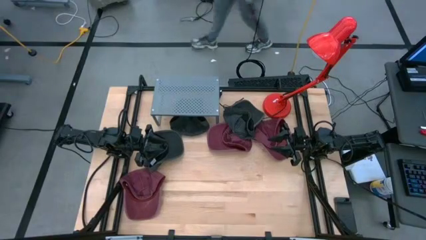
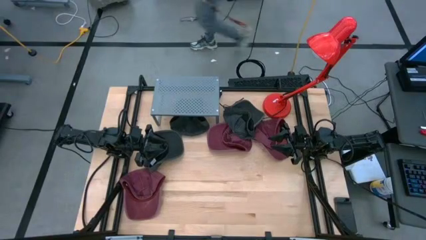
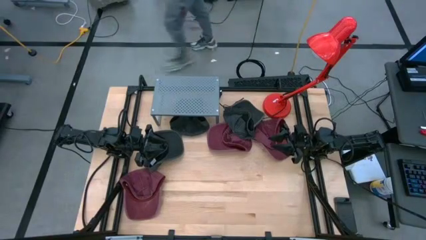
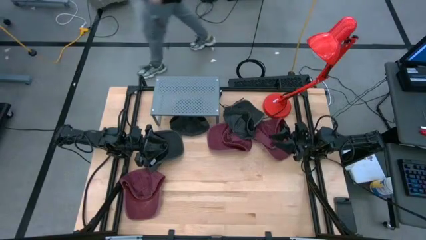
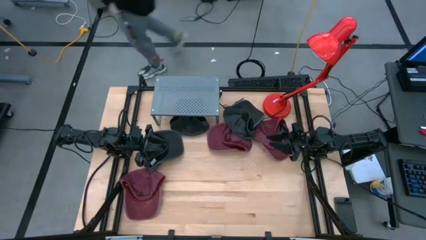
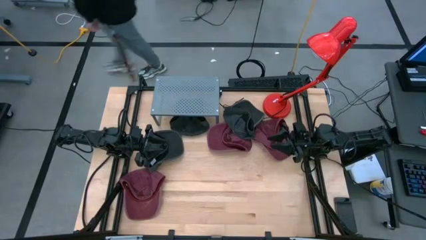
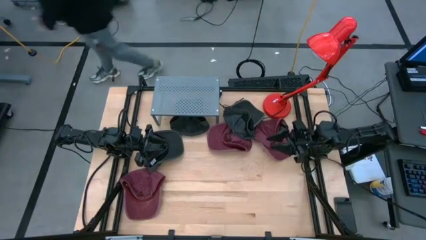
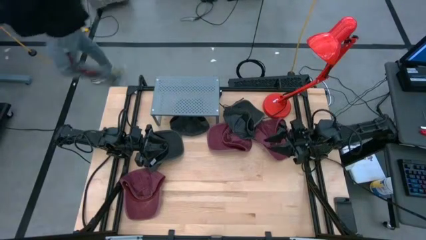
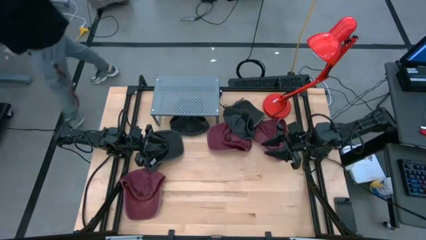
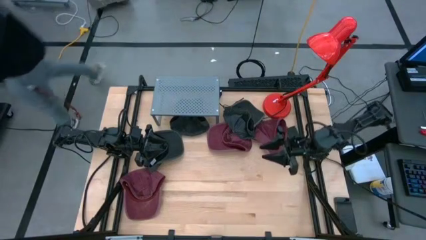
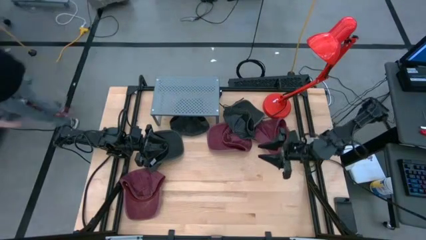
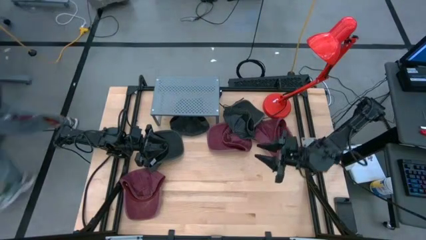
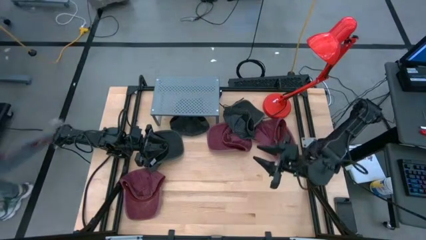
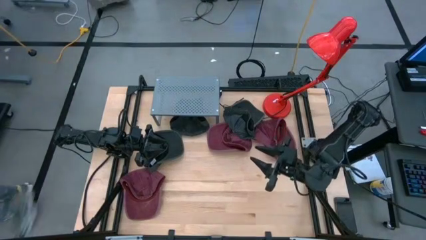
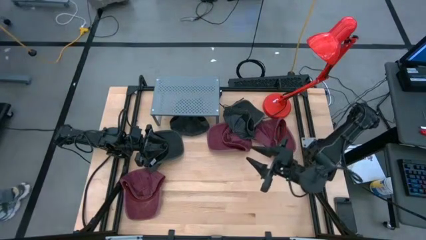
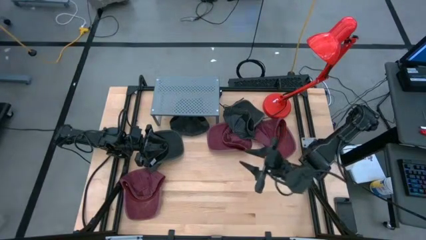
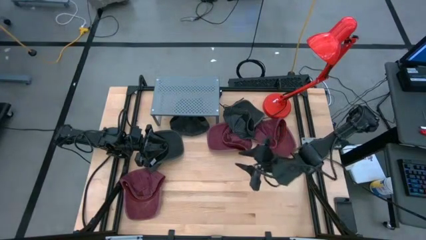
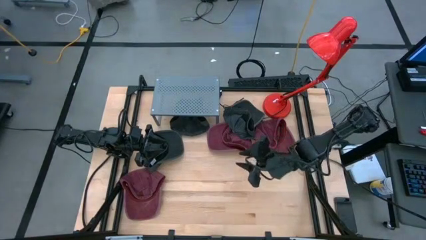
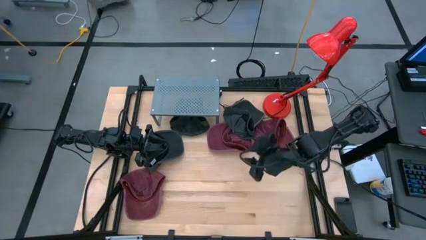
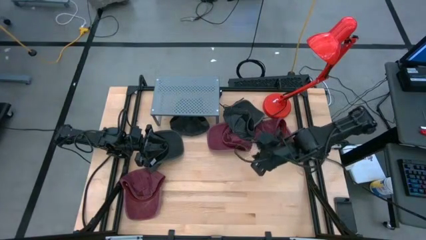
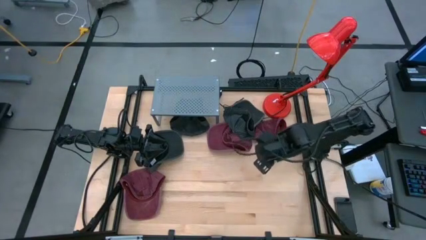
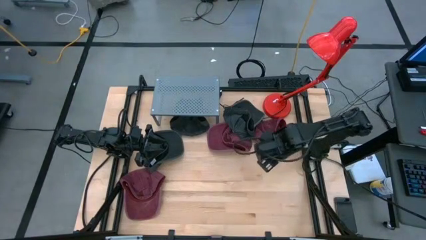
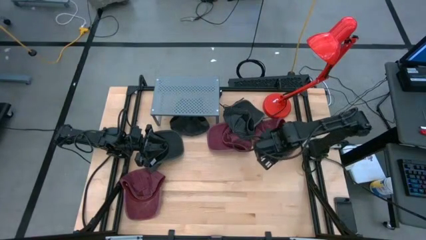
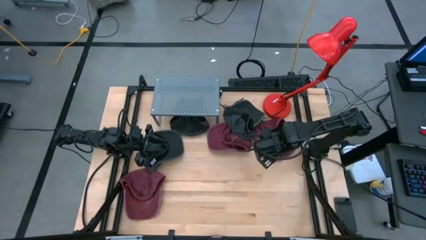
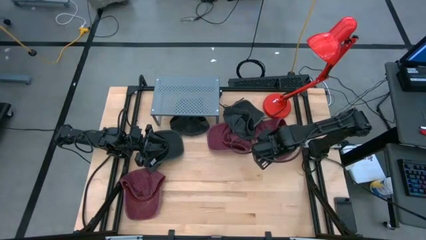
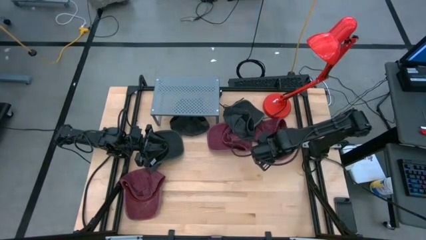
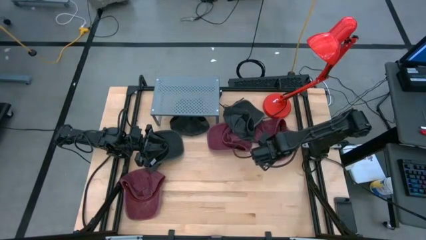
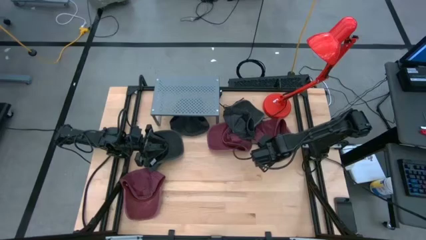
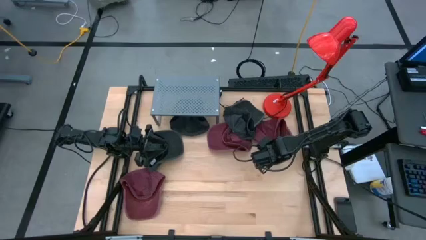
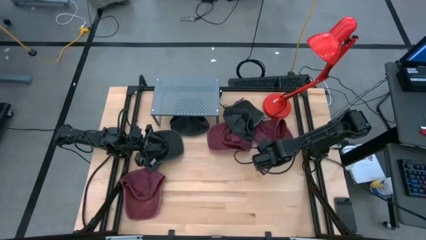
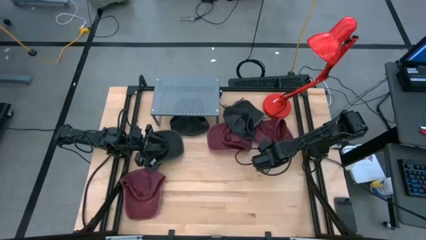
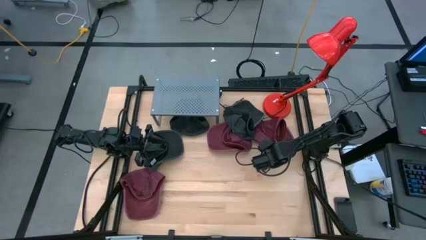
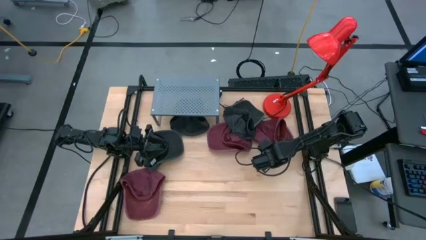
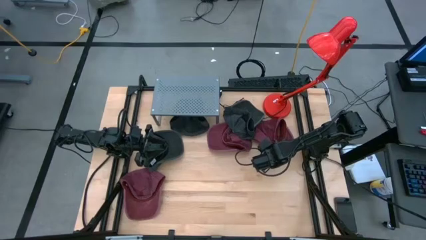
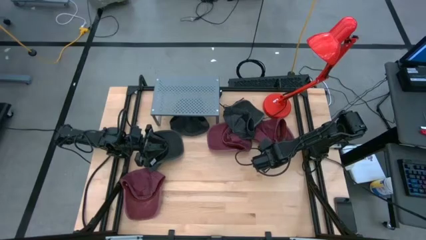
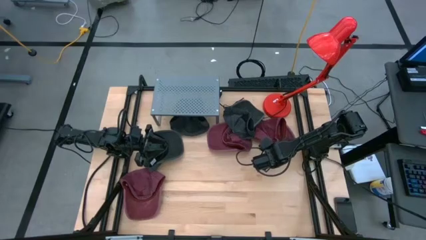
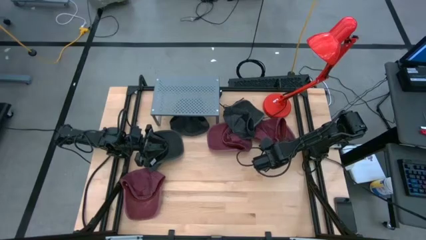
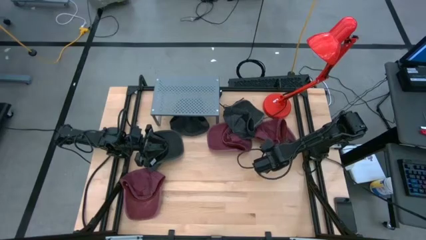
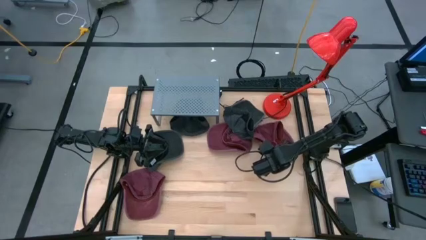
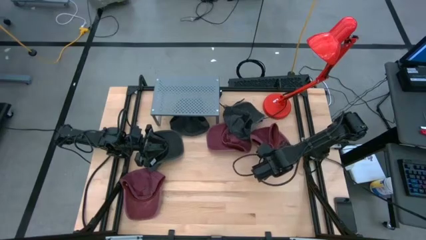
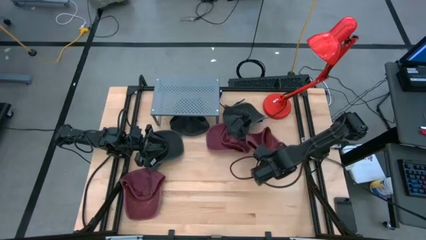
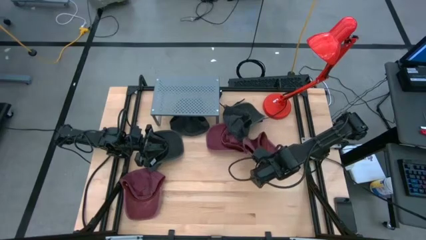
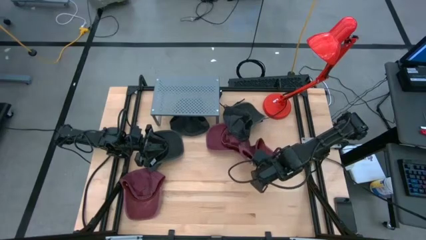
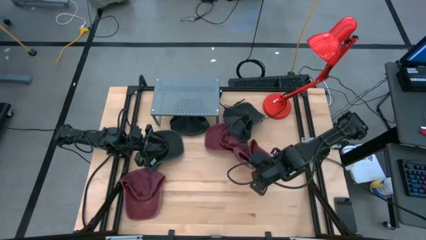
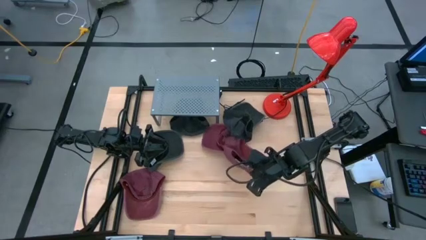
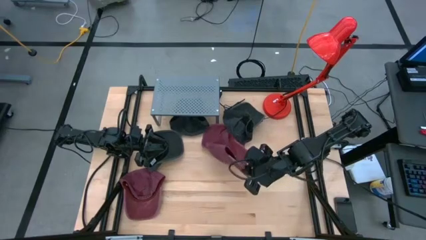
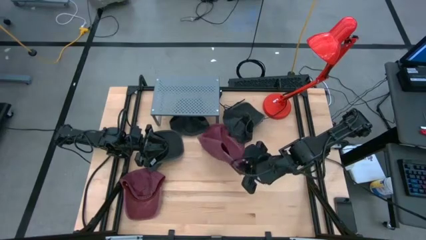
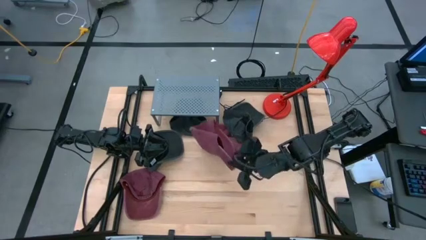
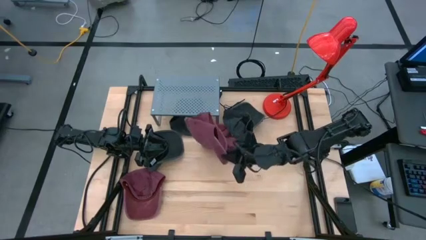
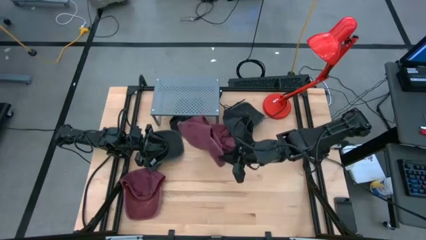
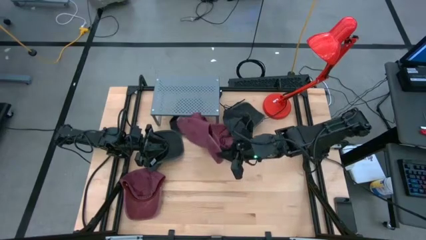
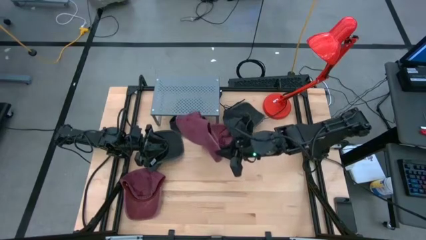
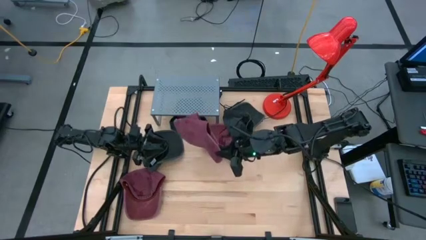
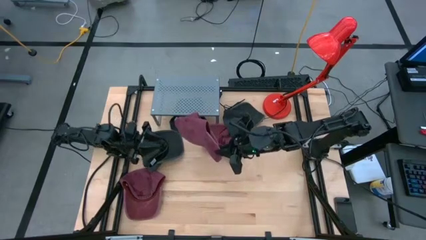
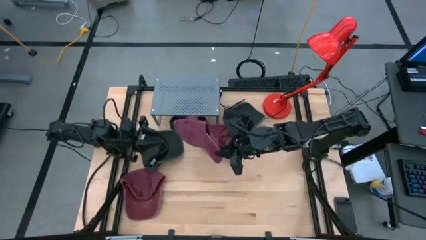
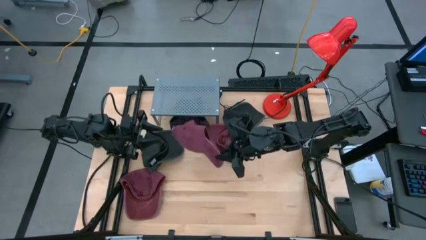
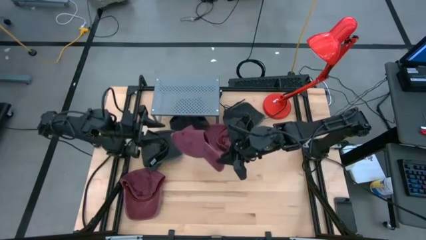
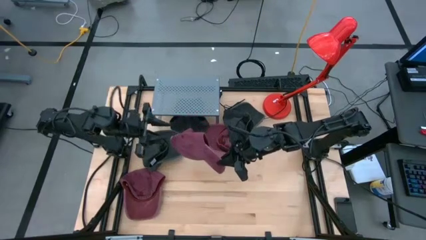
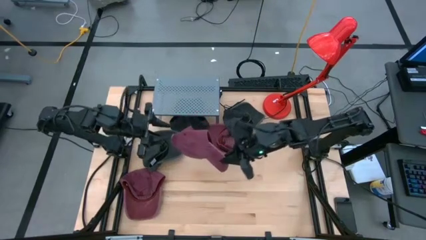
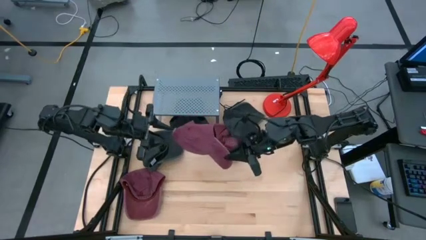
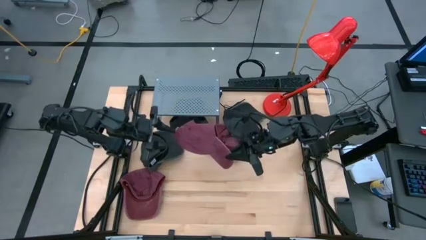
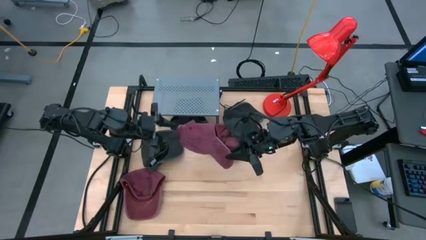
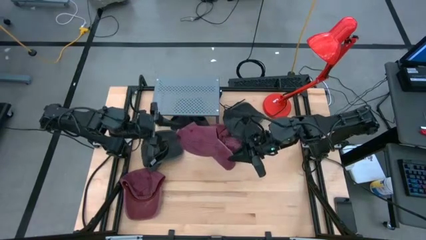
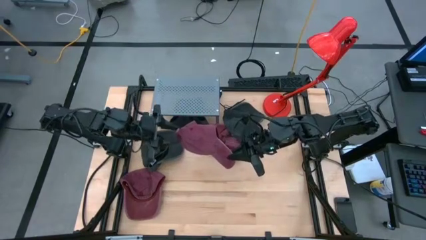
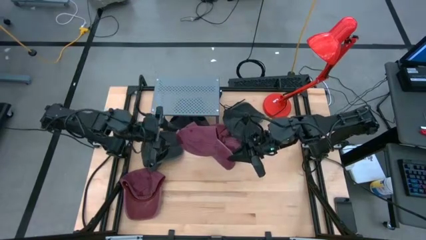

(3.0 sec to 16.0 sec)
Task: Pick & Place hat
Put the top right red cap on the shelf
